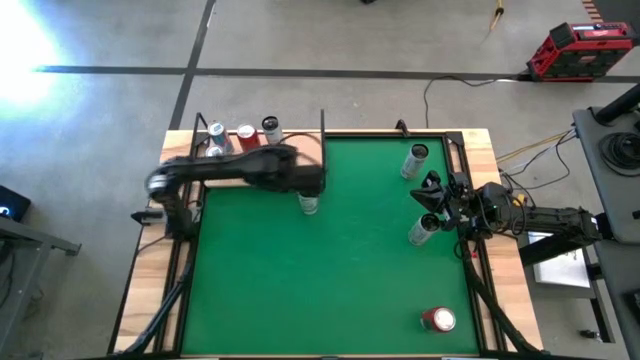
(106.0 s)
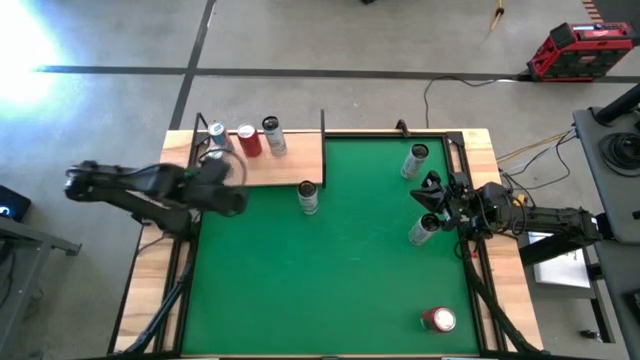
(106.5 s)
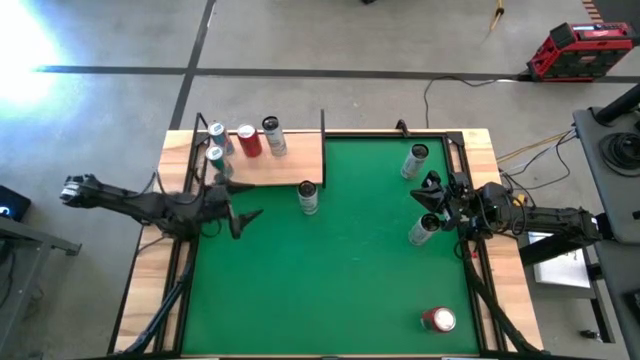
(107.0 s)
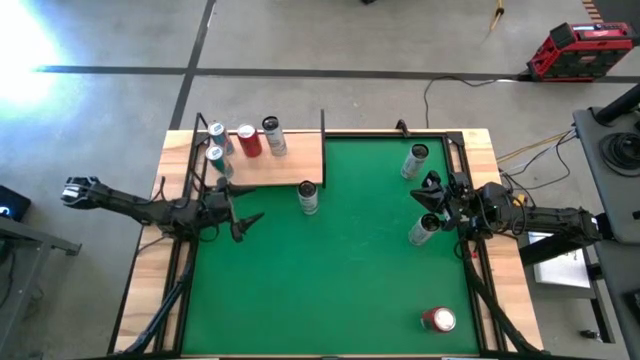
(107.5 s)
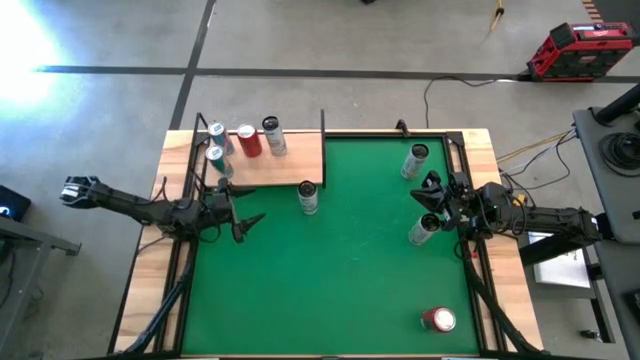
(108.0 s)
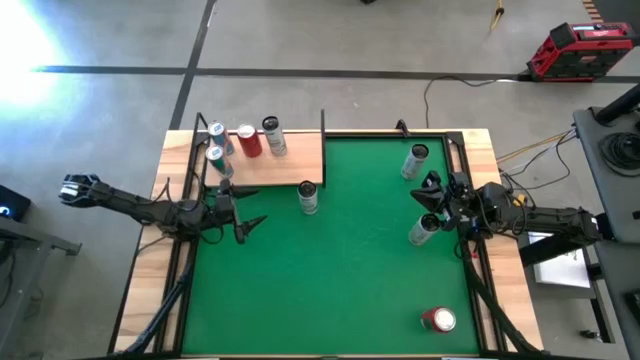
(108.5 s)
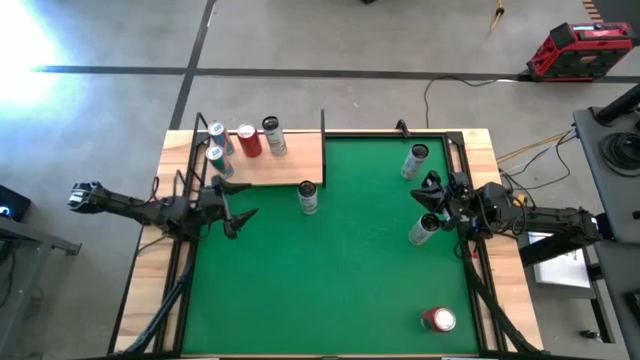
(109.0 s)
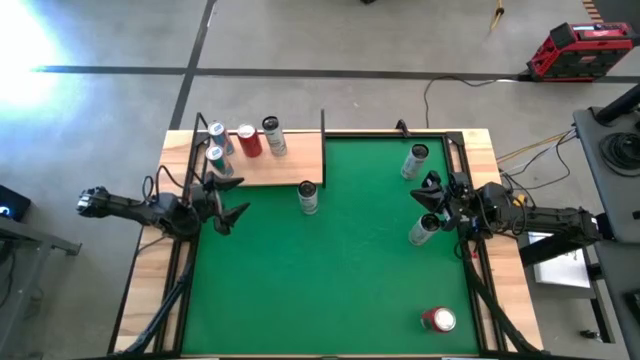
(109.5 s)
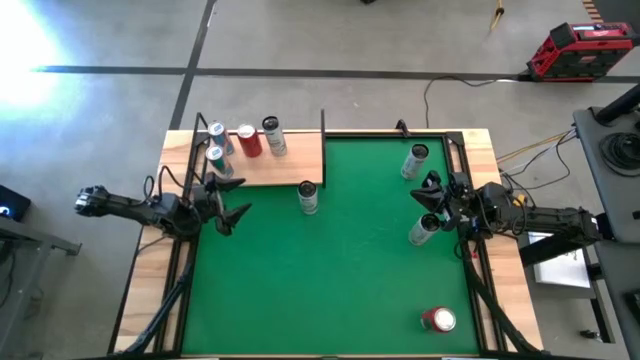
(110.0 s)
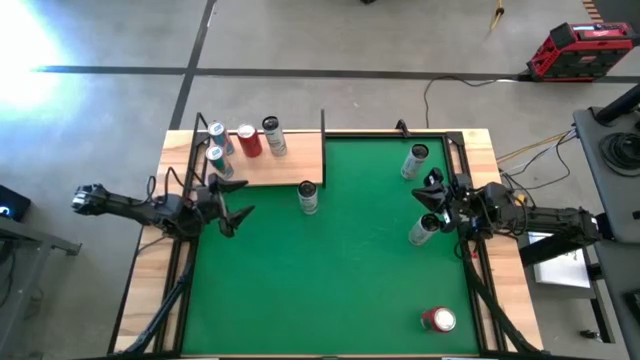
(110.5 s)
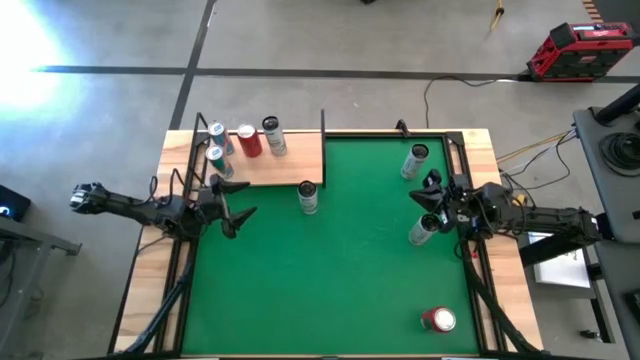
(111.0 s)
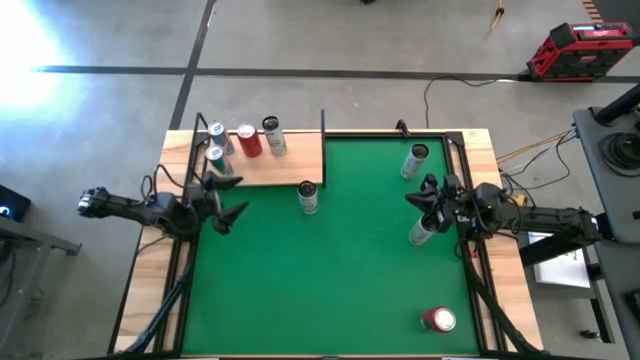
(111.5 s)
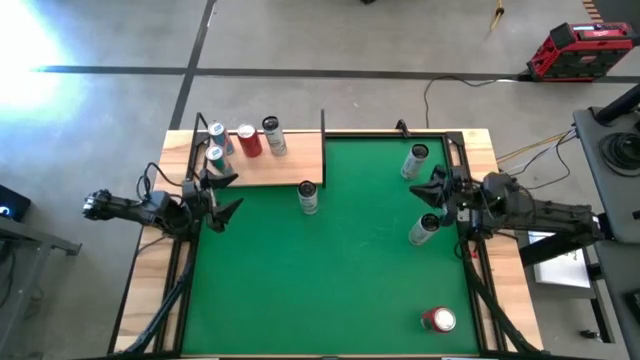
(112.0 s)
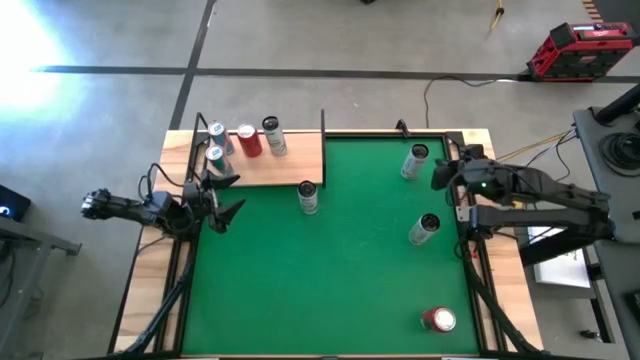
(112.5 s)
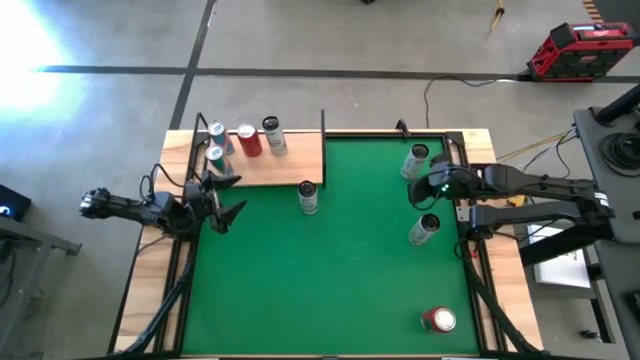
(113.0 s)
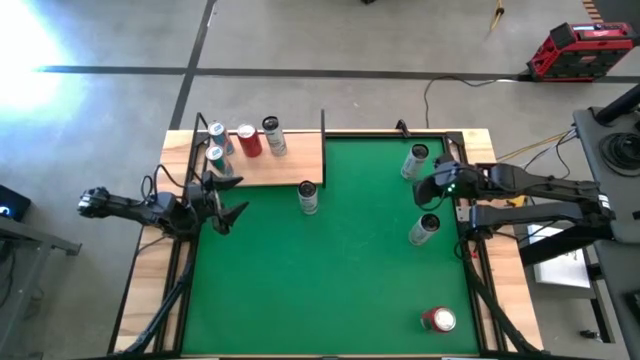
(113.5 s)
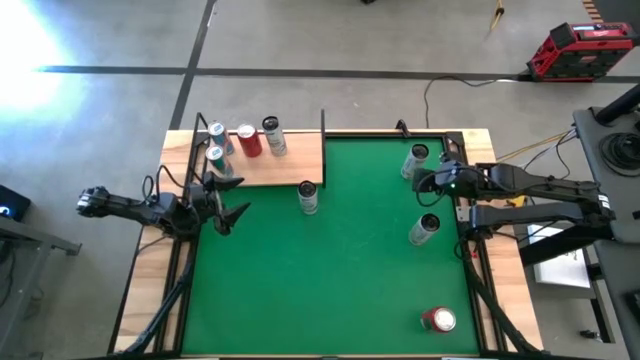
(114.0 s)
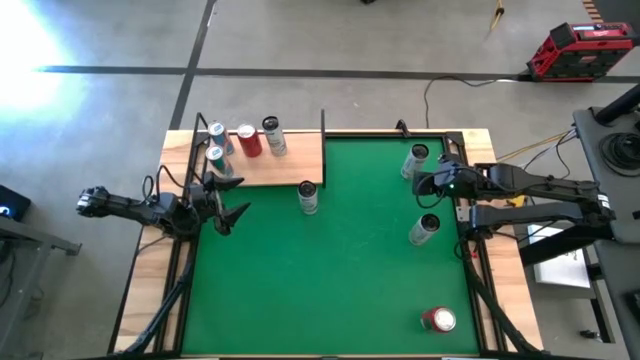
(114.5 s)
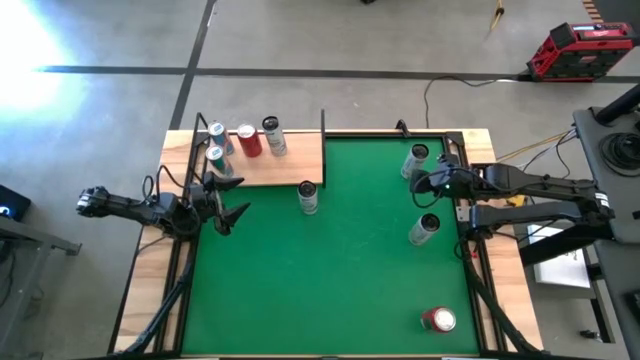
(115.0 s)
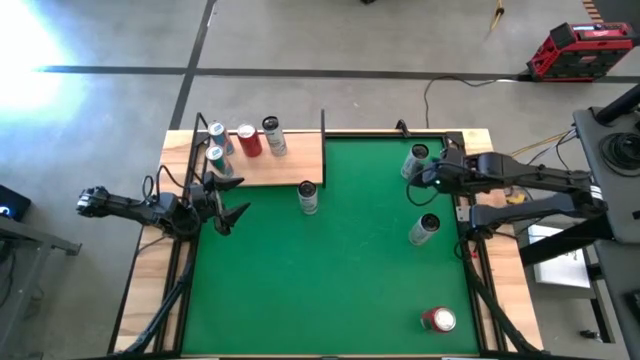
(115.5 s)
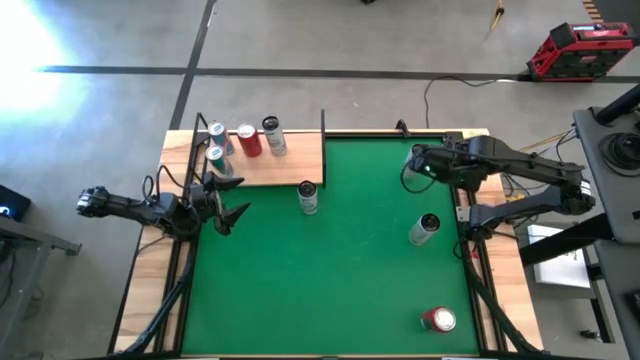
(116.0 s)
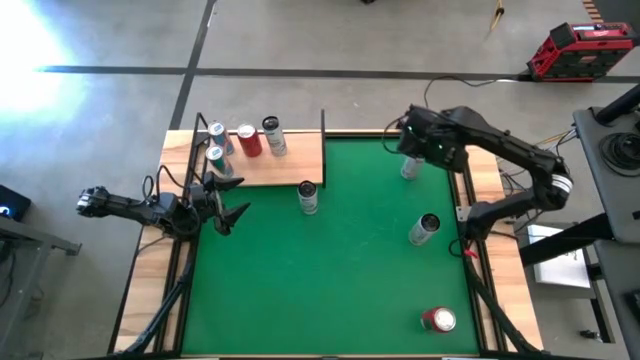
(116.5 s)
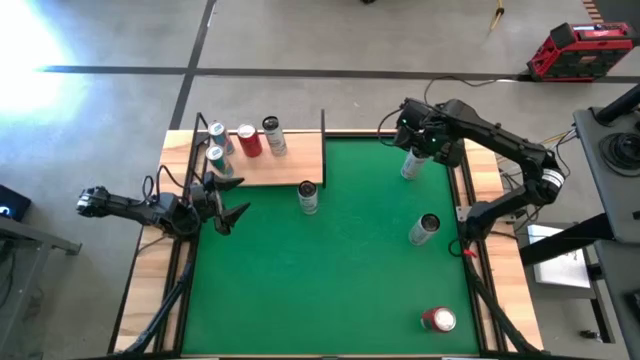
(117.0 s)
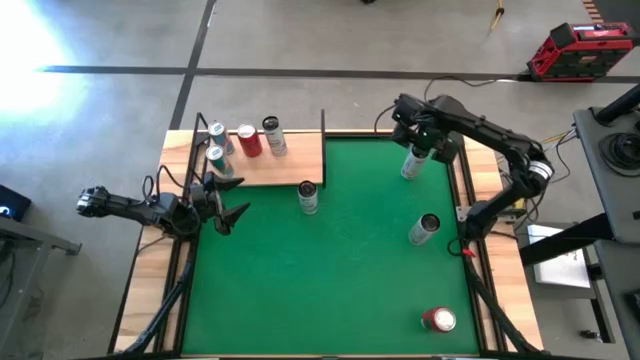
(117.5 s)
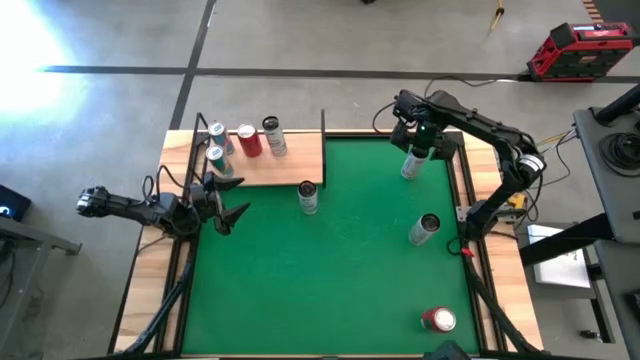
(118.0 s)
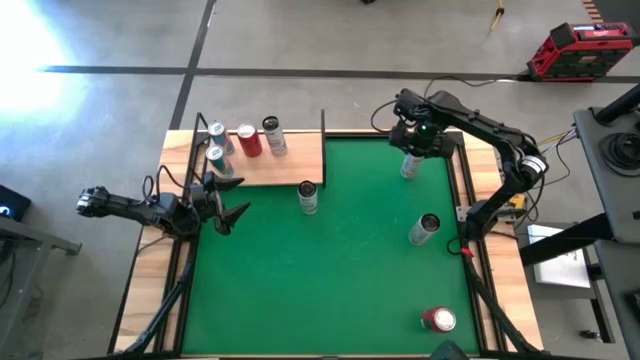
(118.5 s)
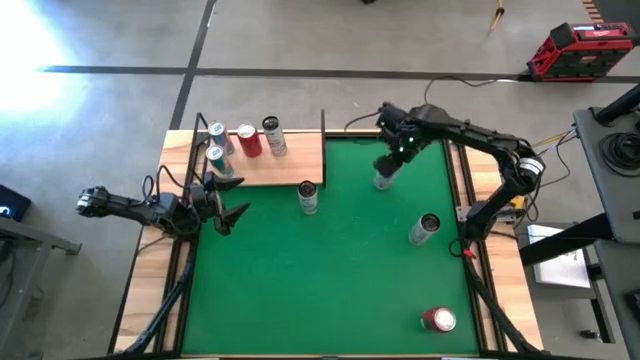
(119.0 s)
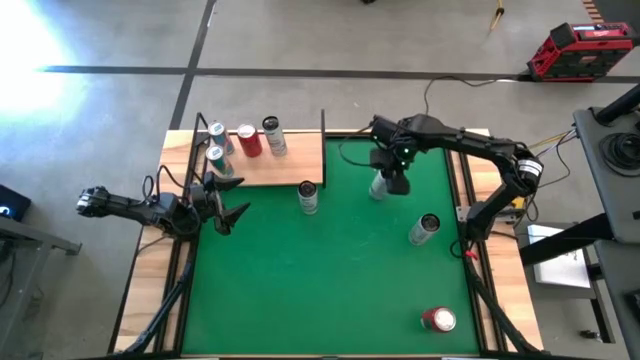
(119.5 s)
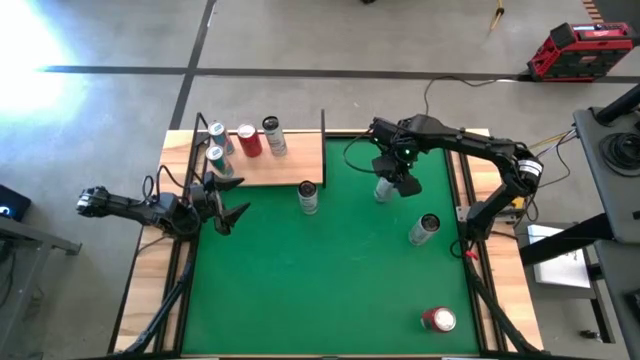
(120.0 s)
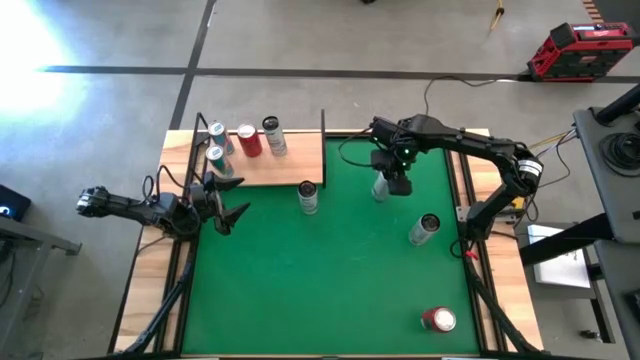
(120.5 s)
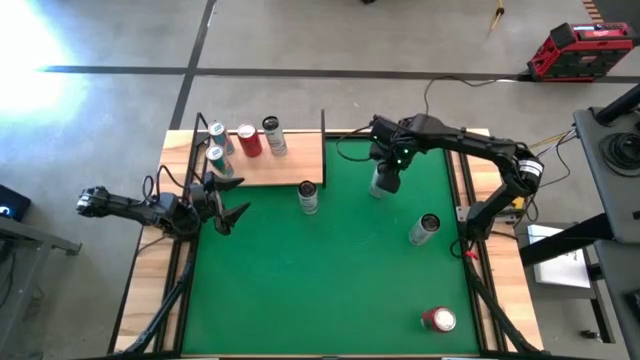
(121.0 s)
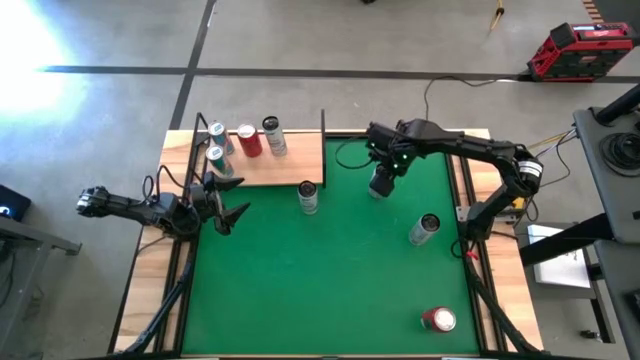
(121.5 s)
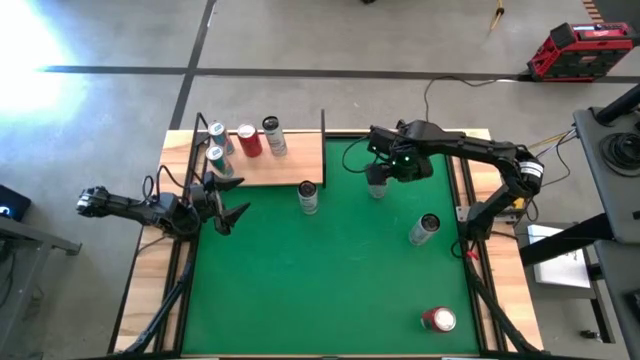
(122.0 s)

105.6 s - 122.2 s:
Task: Place canned beverage on shelf
Move the white yellow soda can to the top center of the table

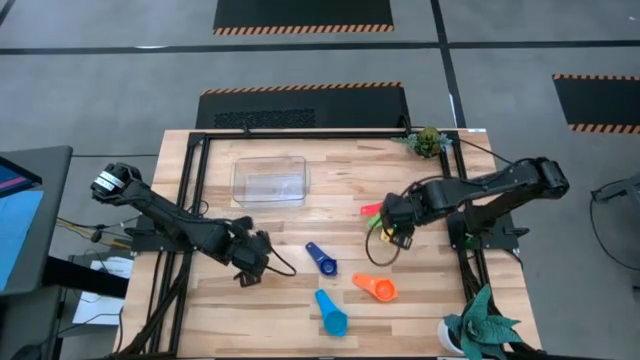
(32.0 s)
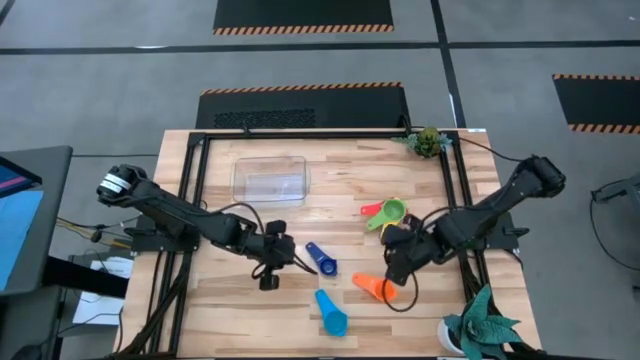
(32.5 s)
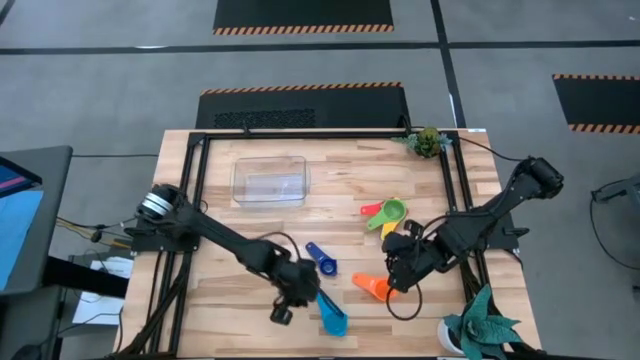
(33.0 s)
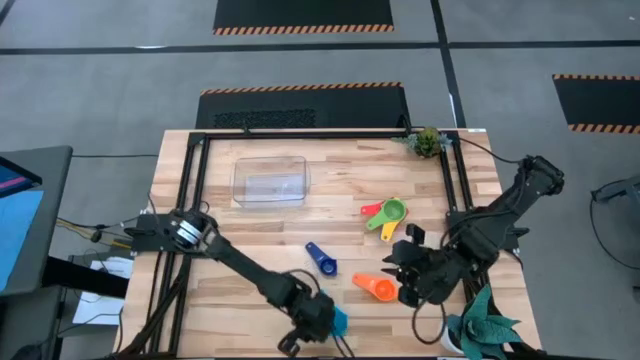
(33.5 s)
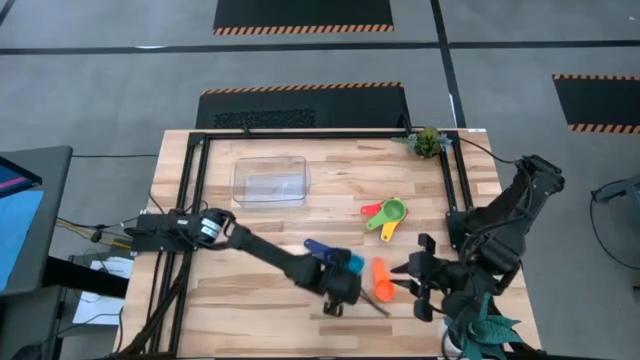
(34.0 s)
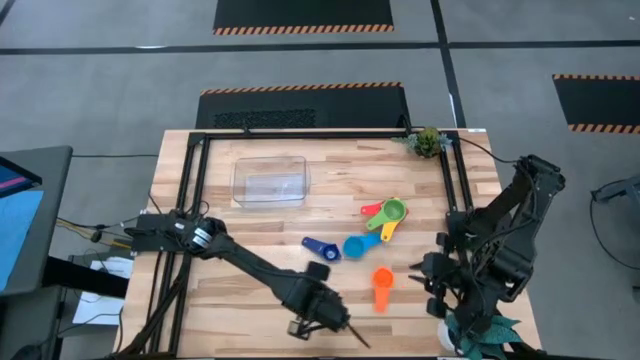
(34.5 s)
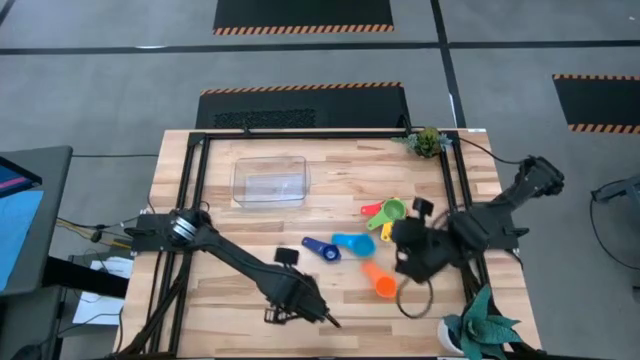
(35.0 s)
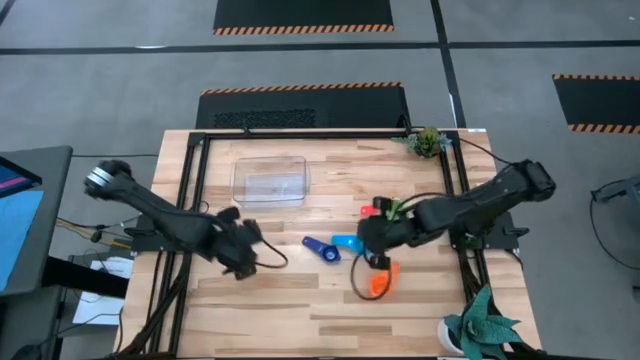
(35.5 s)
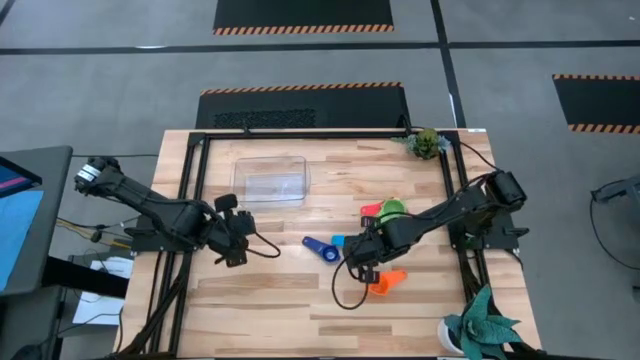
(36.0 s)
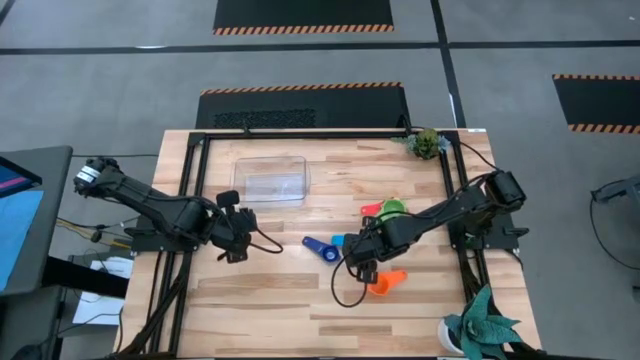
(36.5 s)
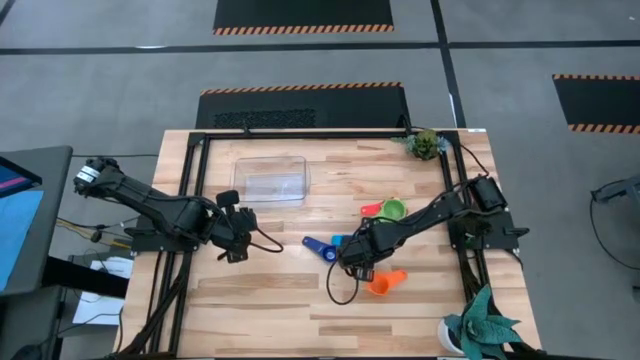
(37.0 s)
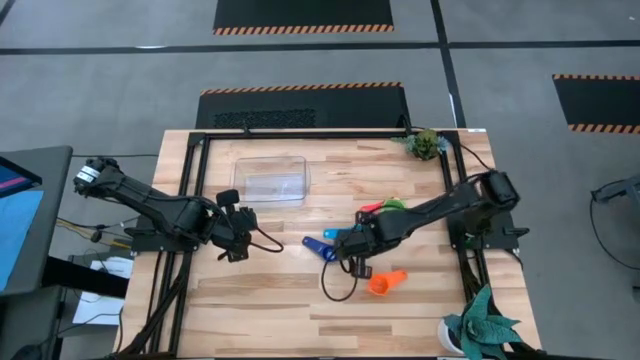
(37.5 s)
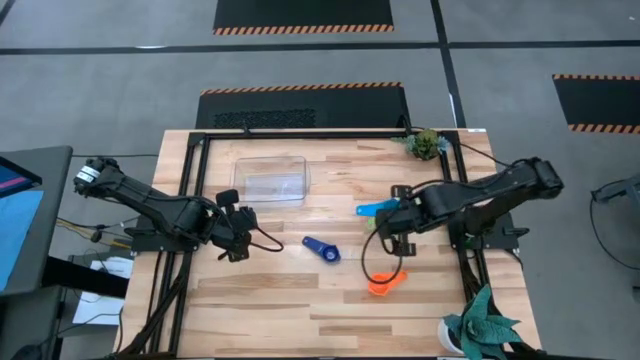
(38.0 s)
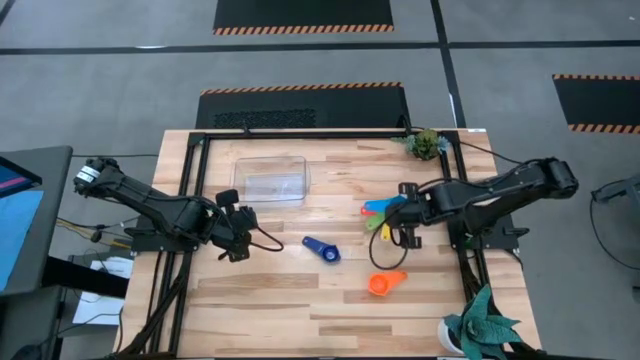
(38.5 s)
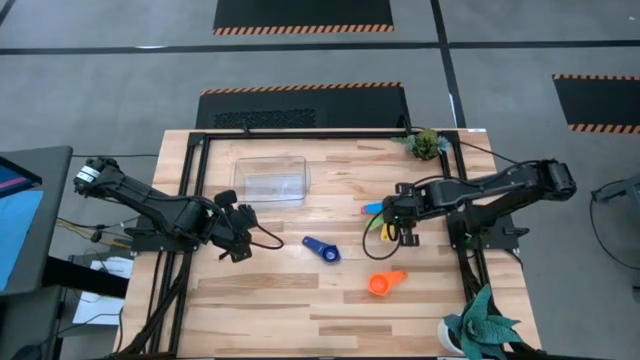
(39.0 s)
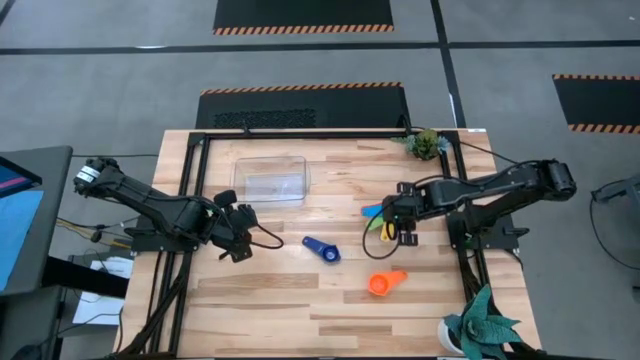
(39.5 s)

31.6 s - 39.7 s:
Task: Nest measuring cups in basket
Stack the light blue measuring cup on top of the green measuring cup
